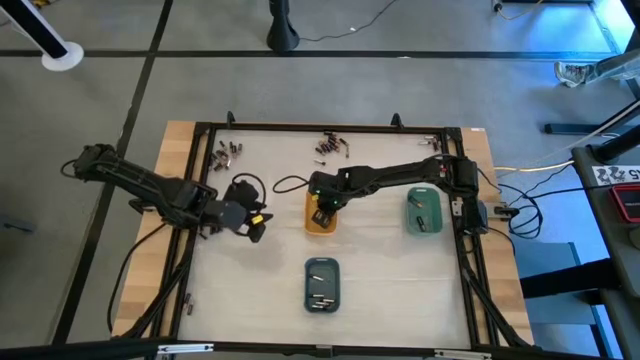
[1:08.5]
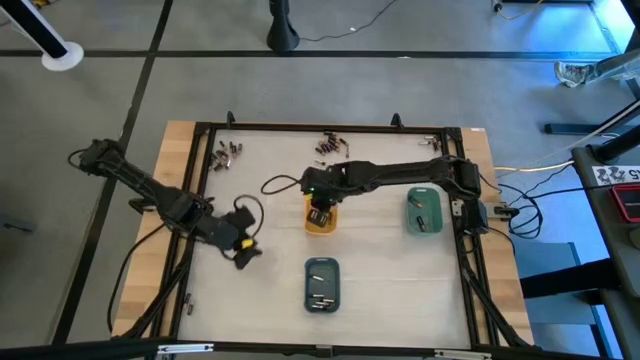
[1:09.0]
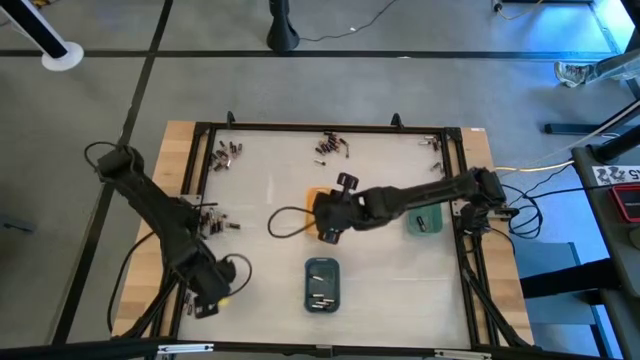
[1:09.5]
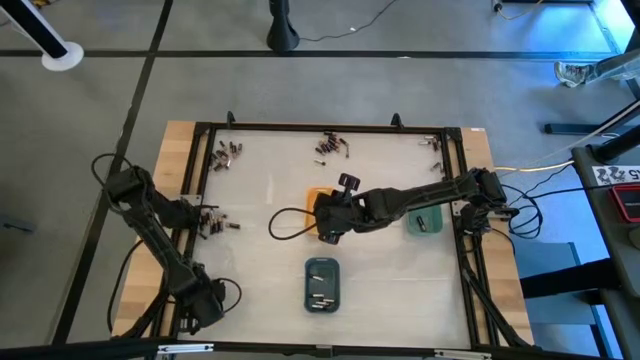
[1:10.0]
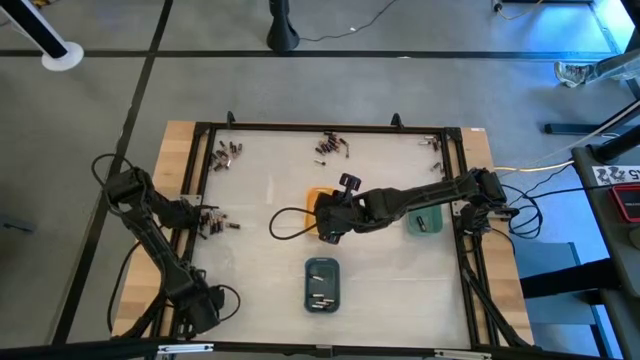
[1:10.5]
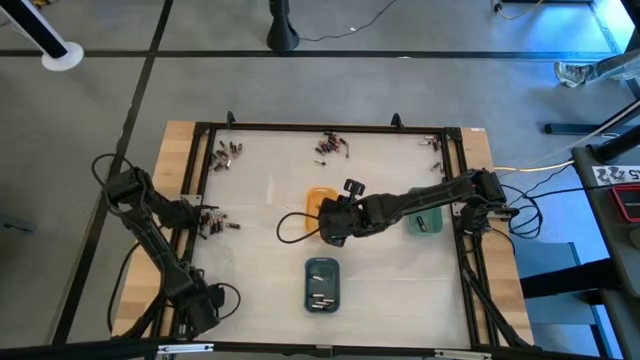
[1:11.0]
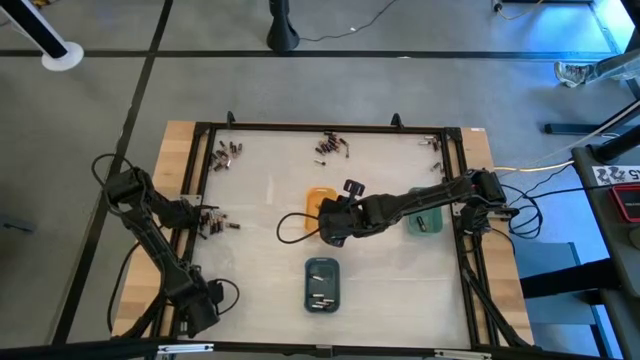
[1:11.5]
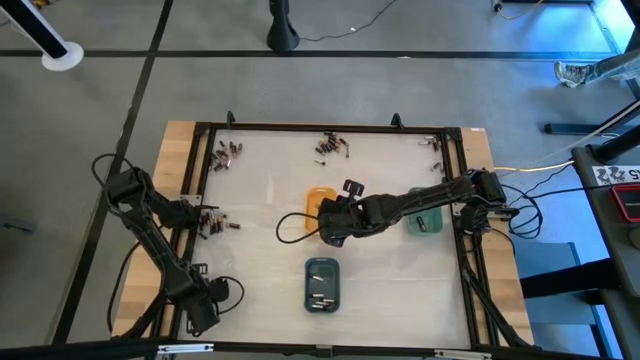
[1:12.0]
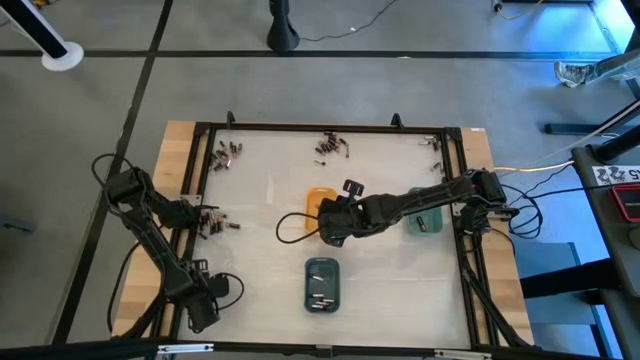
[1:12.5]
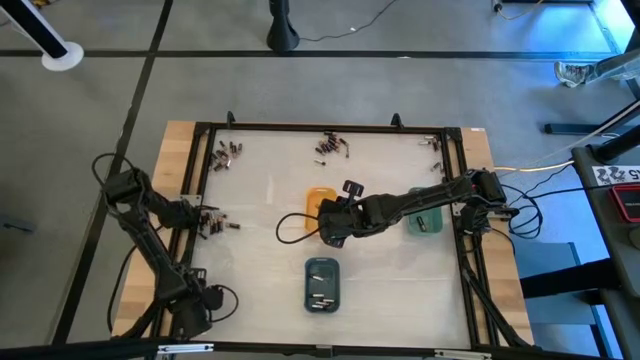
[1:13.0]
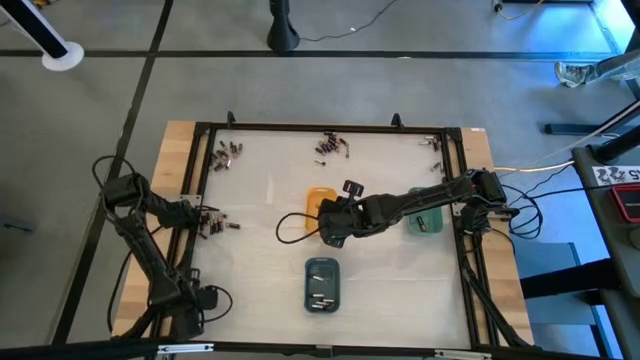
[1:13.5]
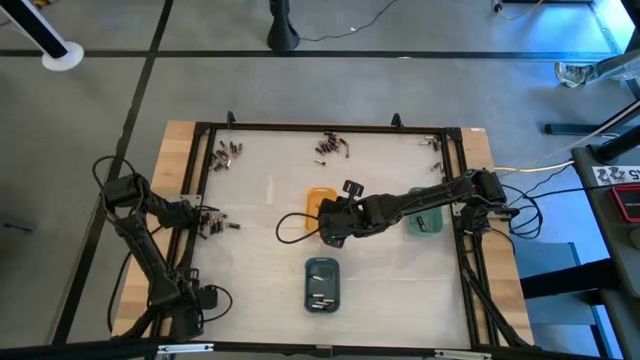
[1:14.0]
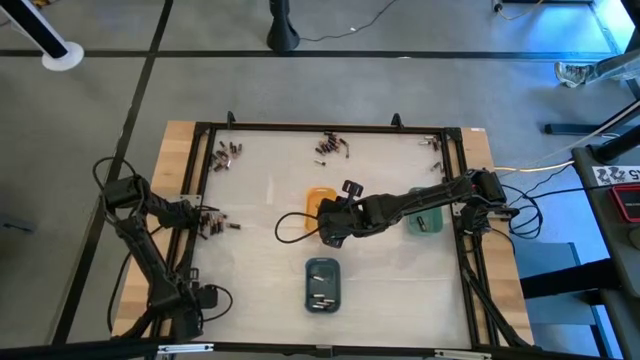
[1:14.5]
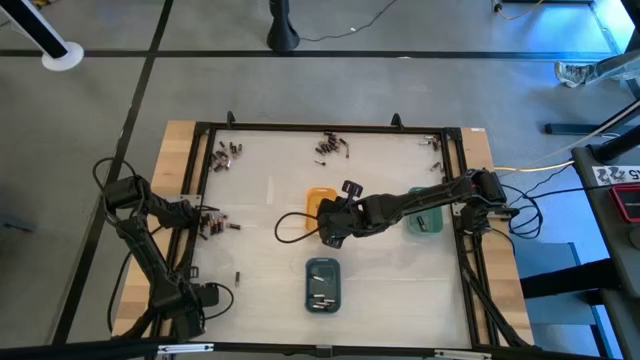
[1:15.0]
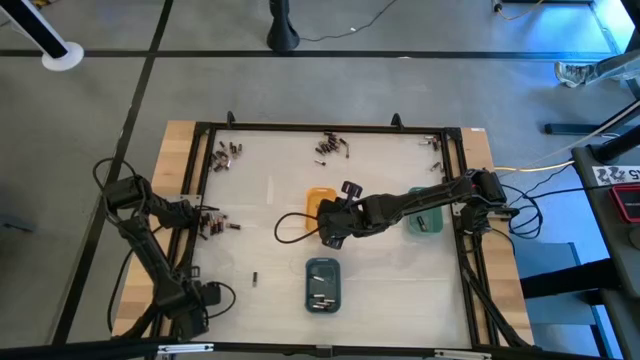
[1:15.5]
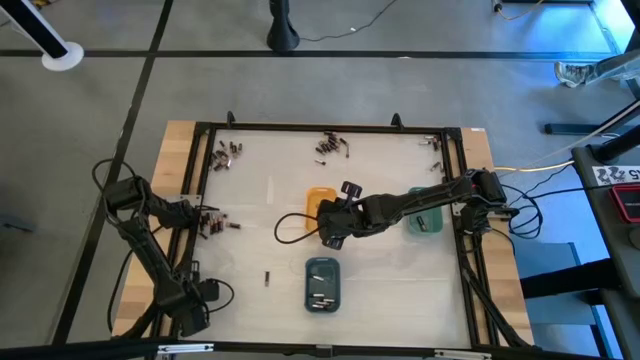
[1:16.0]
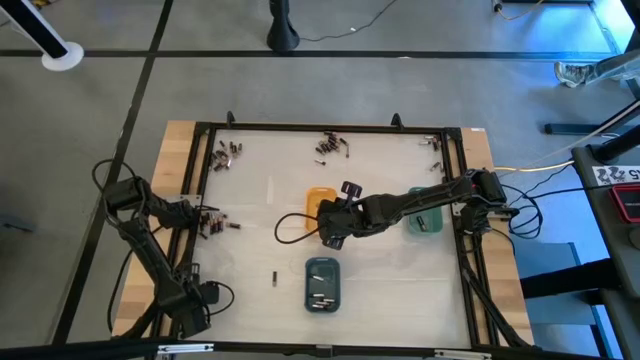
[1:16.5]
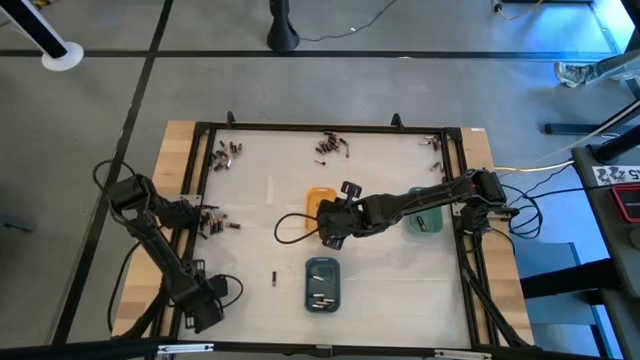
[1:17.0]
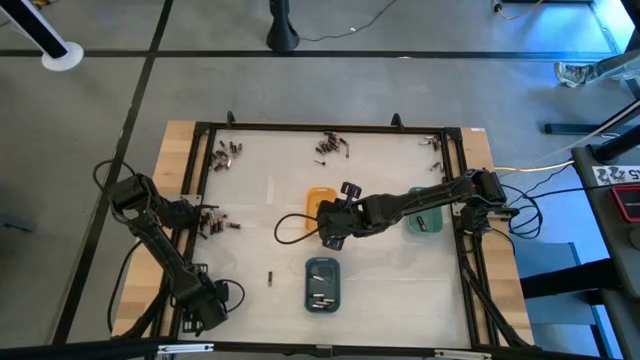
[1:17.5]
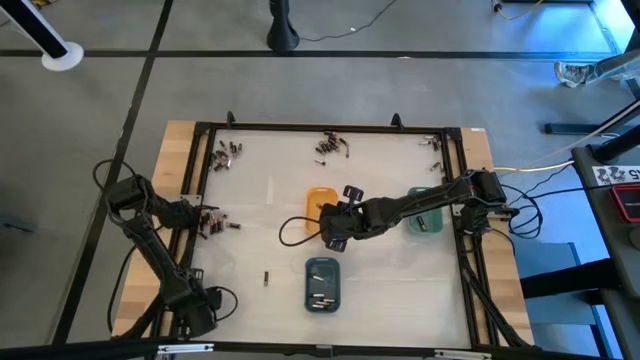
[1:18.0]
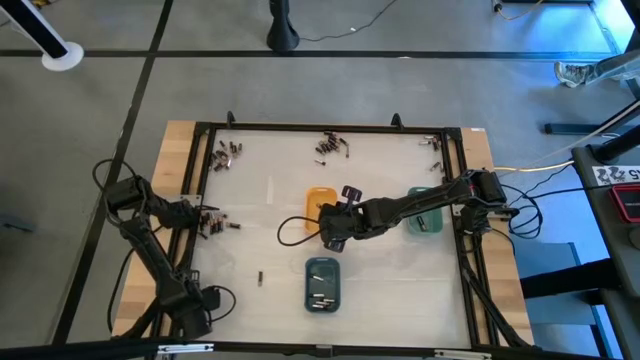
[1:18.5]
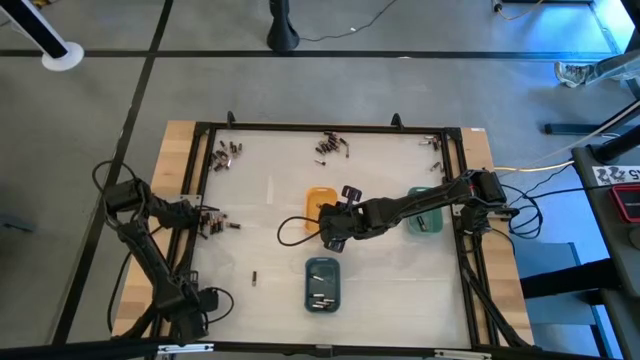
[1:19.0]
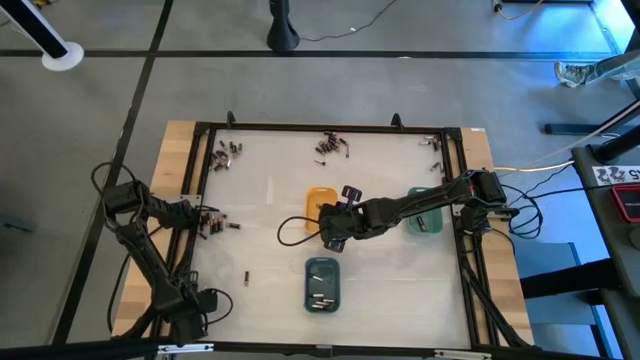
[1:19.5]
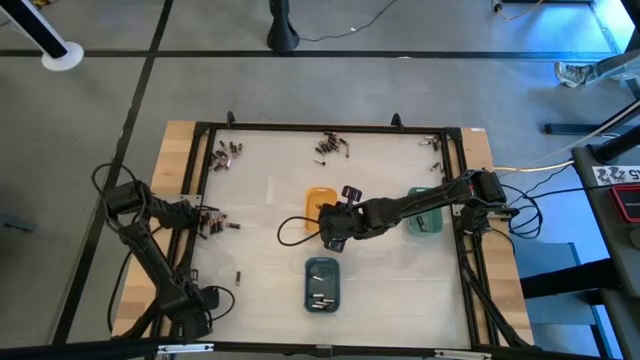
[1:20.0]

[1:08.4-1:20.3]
Task: Sort batteries
Put the bottom left duracell AAA battery into the yellow bin

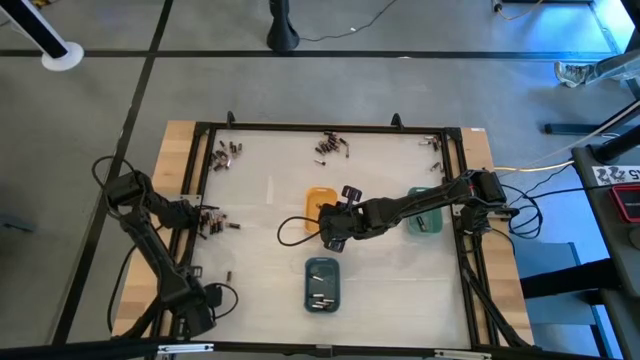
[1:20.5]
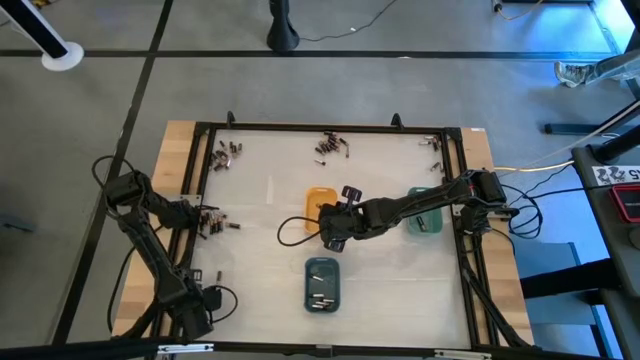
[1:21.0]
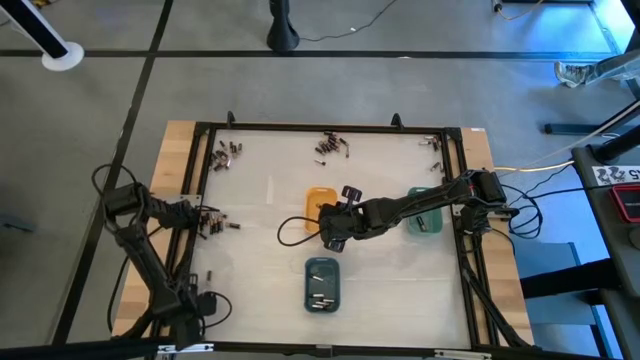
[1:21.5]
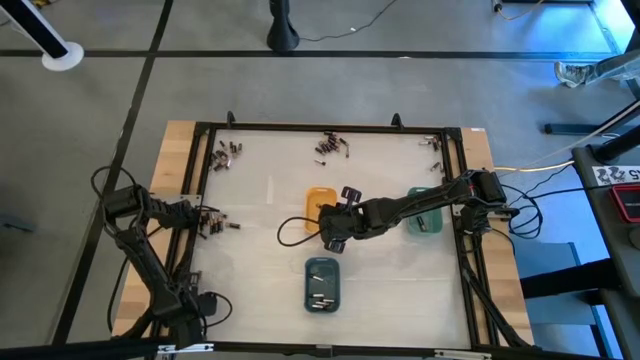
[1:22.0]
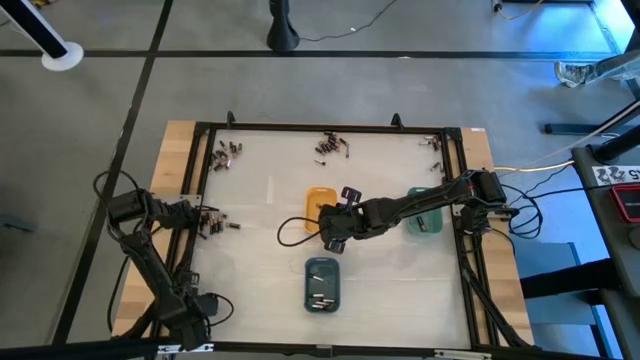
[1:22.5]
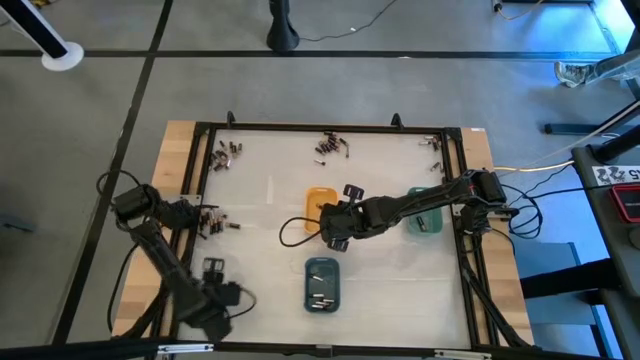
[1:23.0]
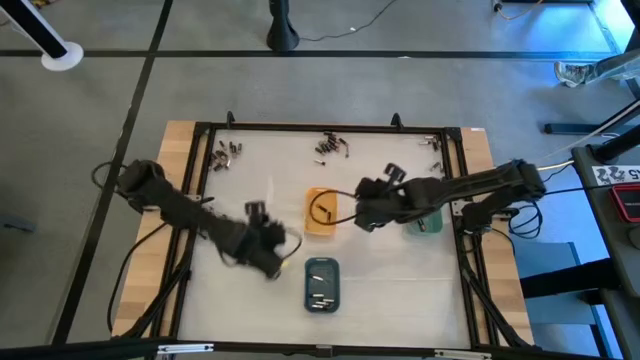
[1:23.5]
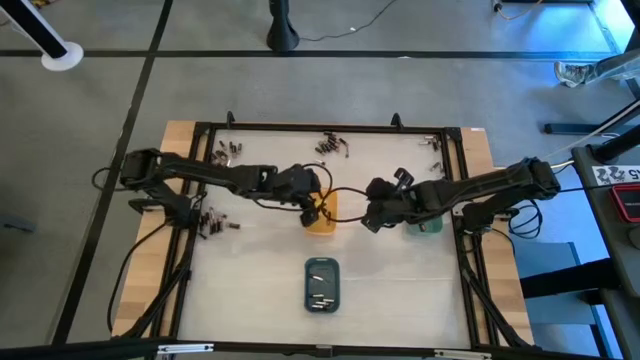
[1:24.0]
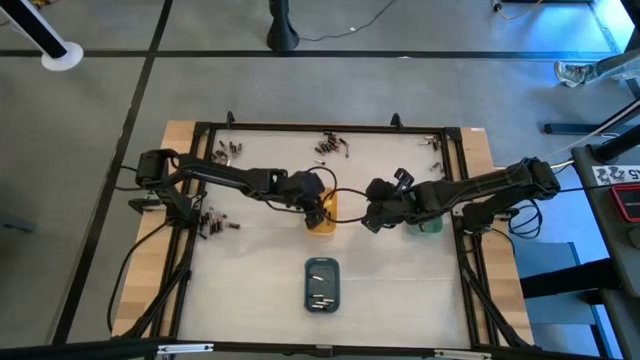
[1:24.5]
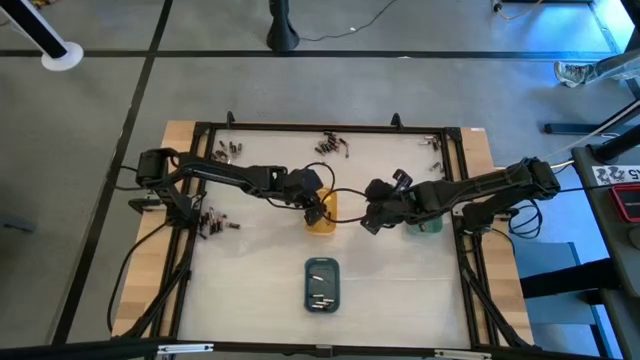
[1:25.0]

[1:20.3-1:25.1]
Put the black battery into the yellow bin

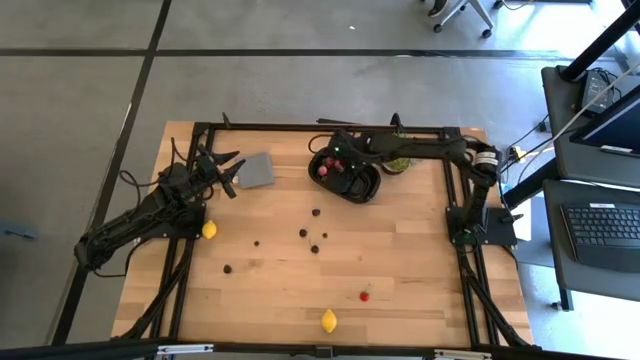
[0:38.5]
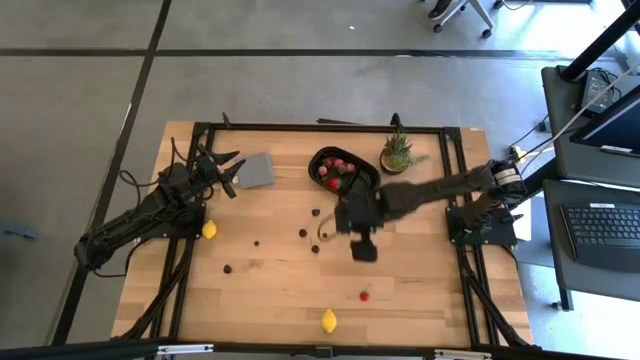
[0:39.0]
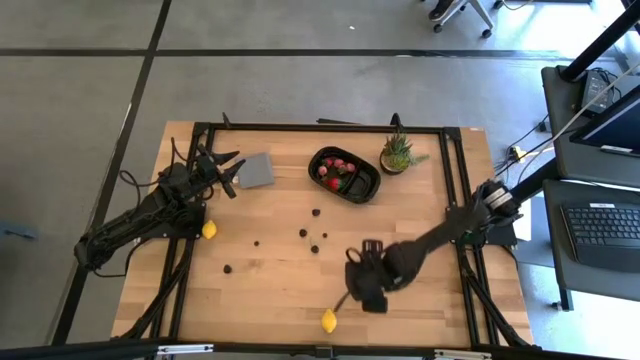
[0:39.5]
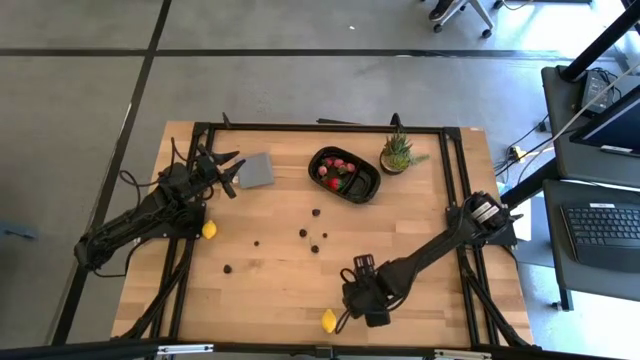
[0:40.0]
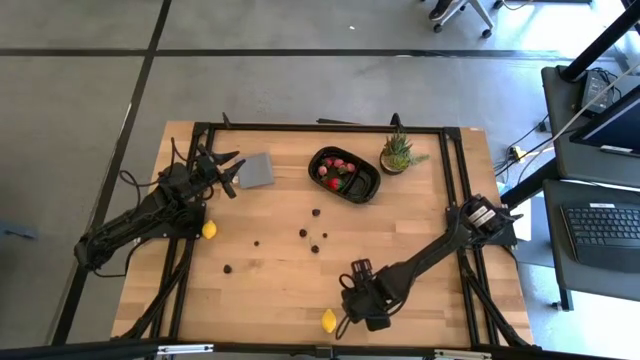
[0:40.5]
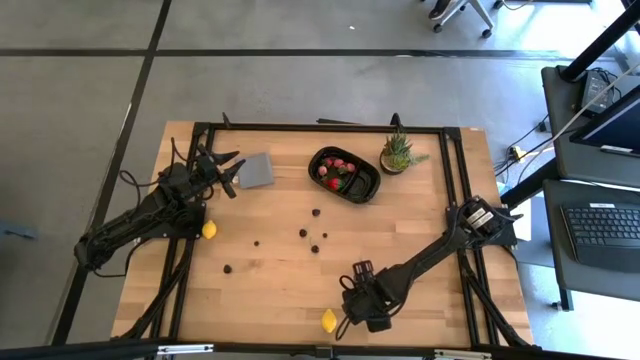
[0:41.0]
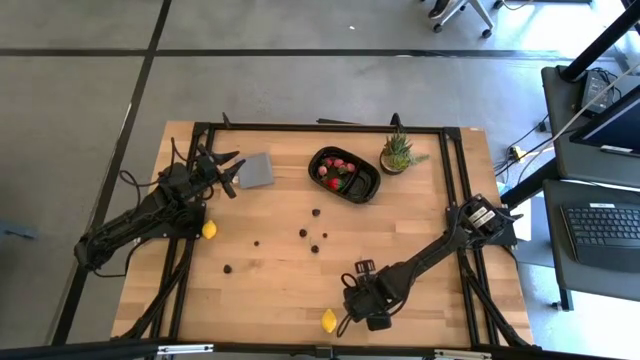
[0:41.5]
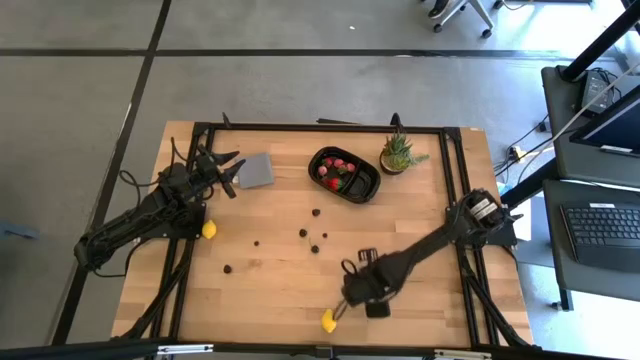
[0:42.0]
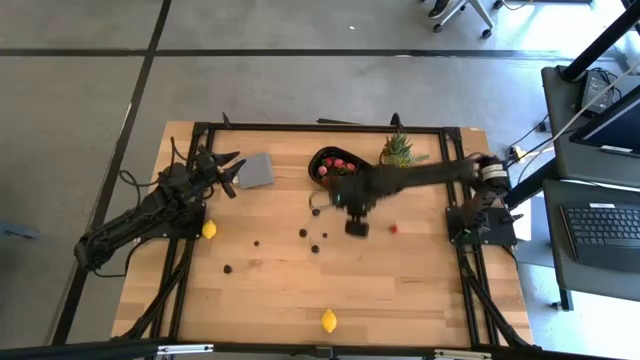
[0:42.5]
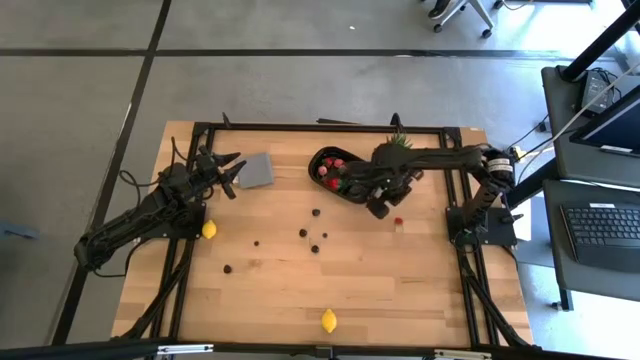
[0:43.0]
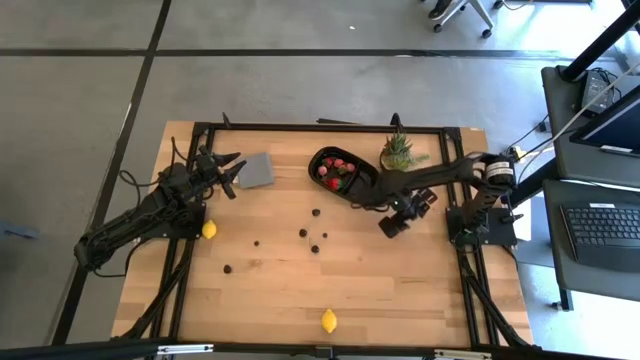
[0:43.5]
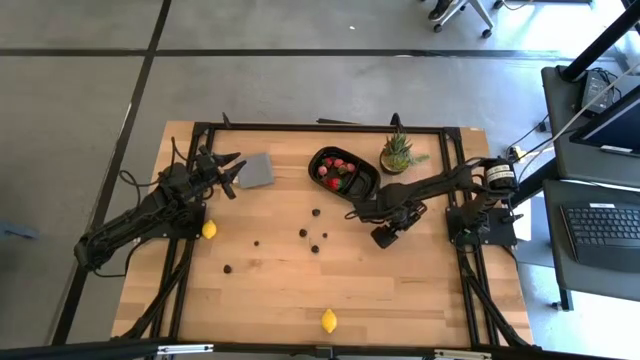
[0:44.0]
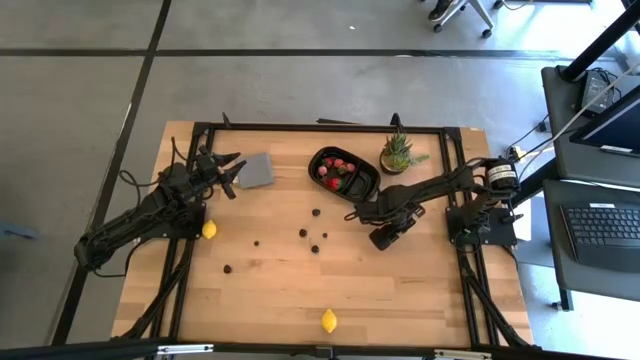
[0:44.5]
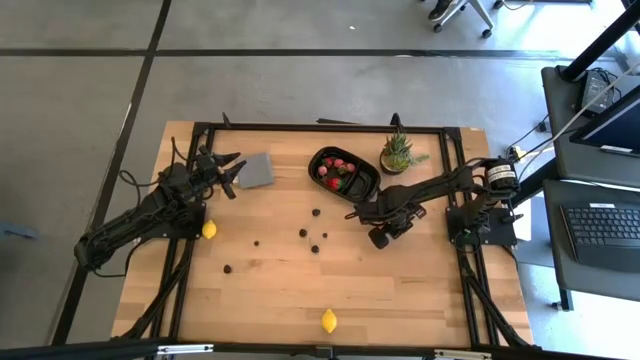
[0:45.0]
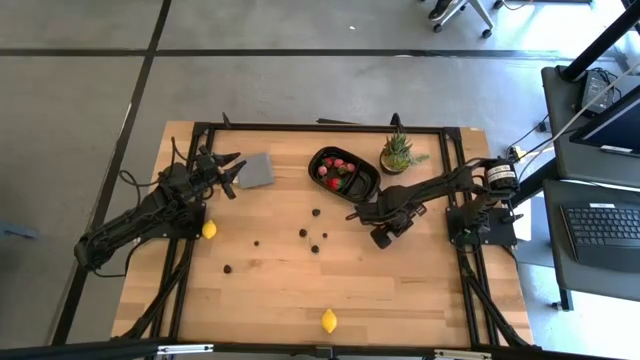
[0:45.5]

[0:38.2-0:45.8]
Task: Pick and placing Produce into tupperware
Put the strawberry into the black bin
